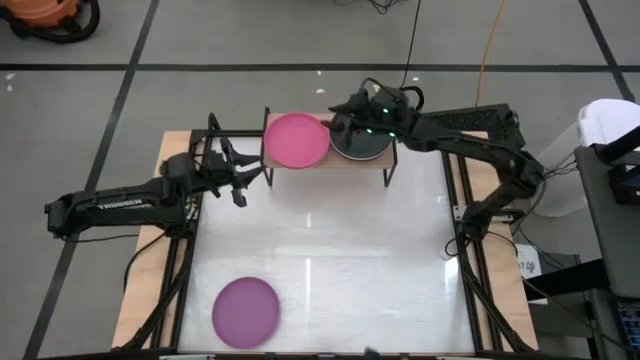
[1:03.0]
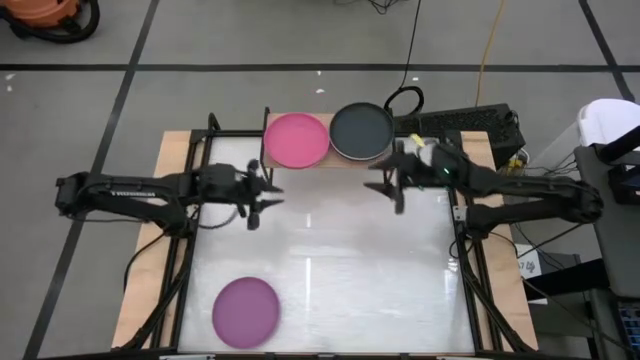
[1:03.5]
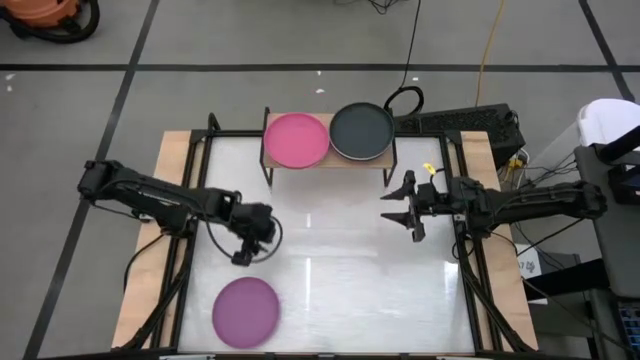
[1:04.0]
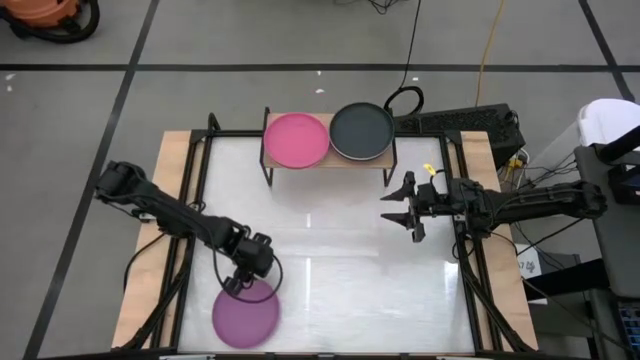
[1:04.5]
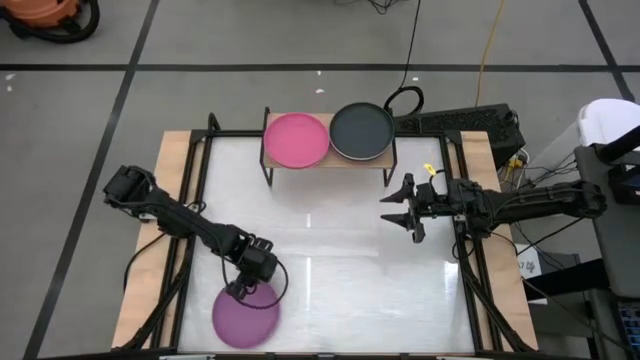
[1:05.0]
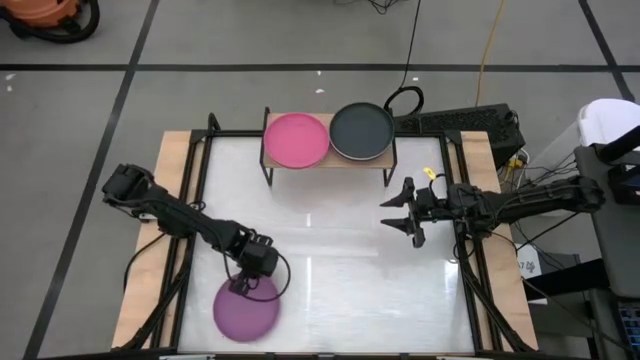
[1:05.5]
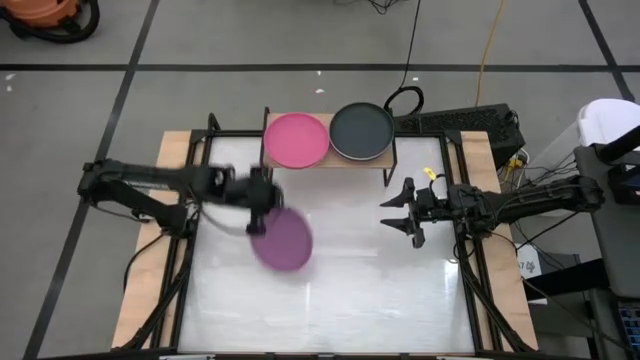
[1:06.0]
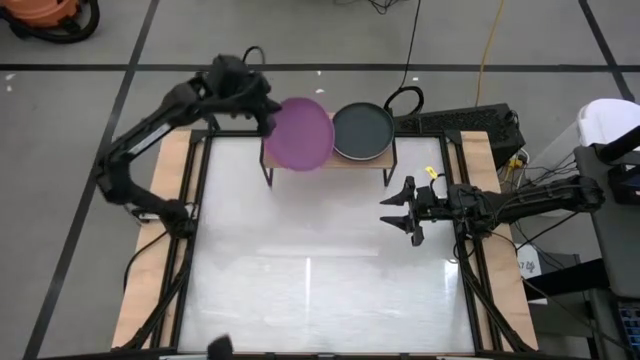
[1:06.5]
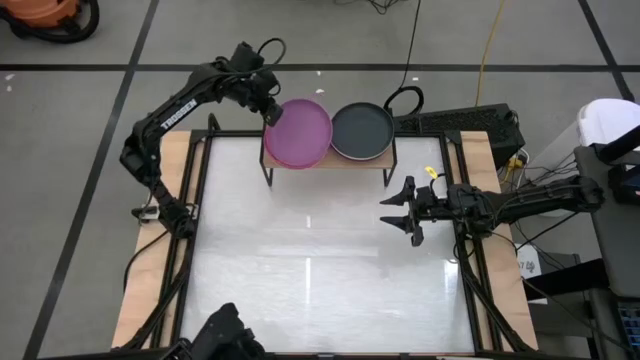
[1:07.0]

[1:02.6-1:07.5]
Task: Place and stack plates onto a shelf
Stack the violet plate on top of the pink plate on the shelf

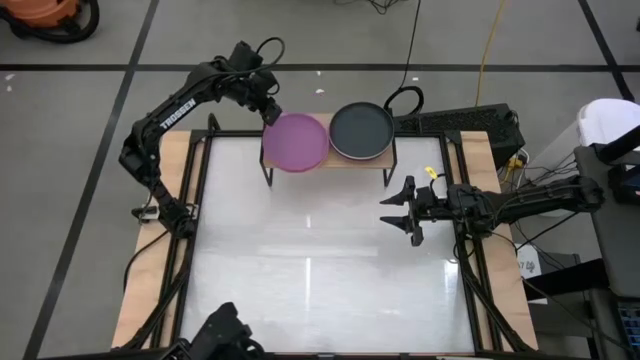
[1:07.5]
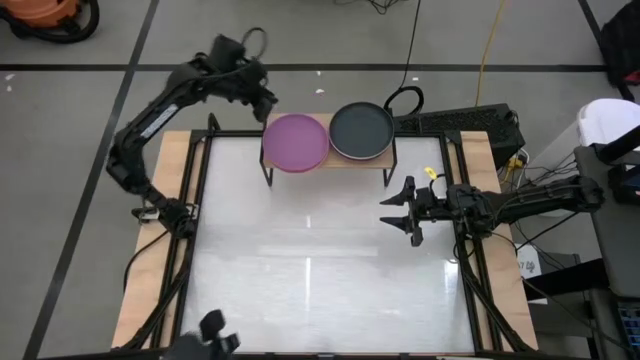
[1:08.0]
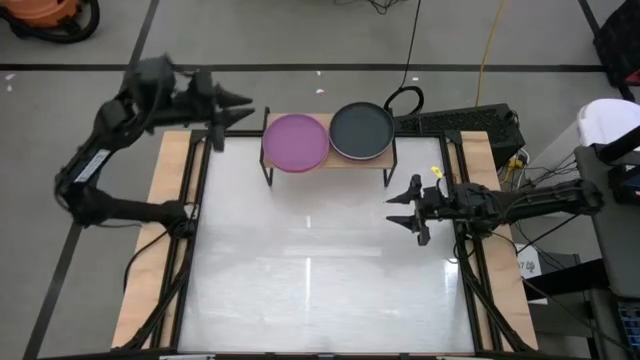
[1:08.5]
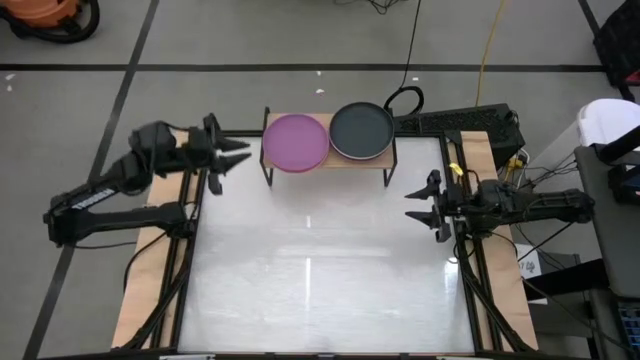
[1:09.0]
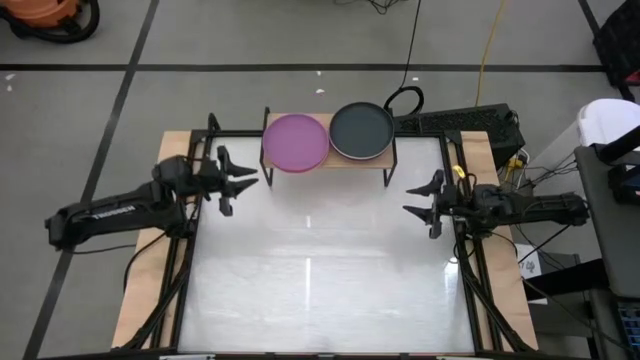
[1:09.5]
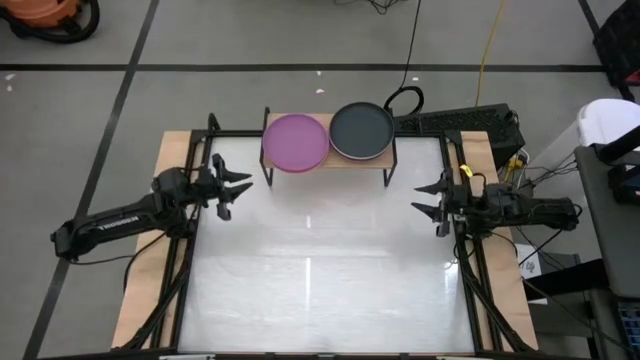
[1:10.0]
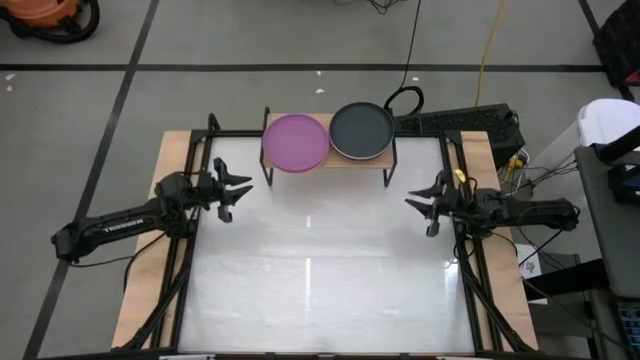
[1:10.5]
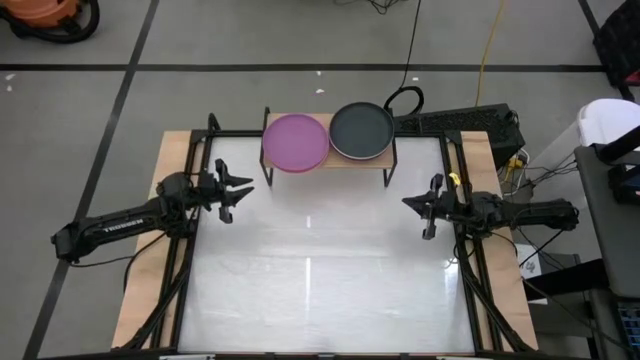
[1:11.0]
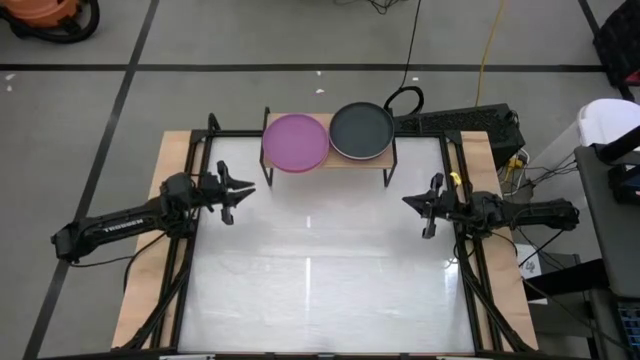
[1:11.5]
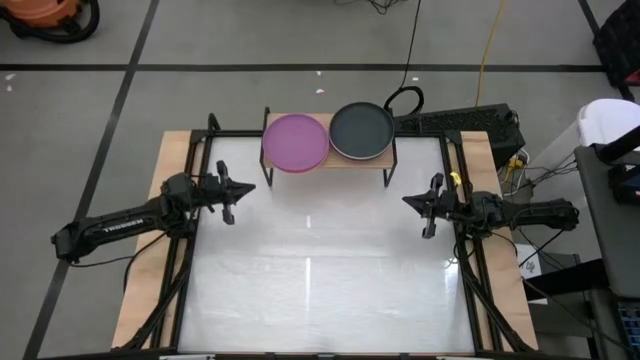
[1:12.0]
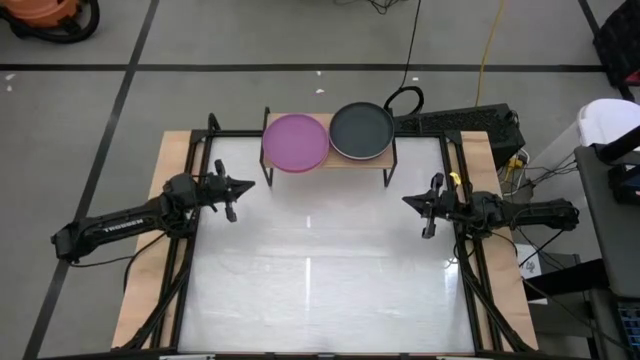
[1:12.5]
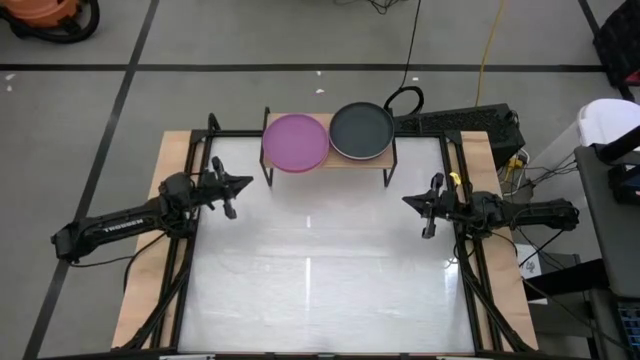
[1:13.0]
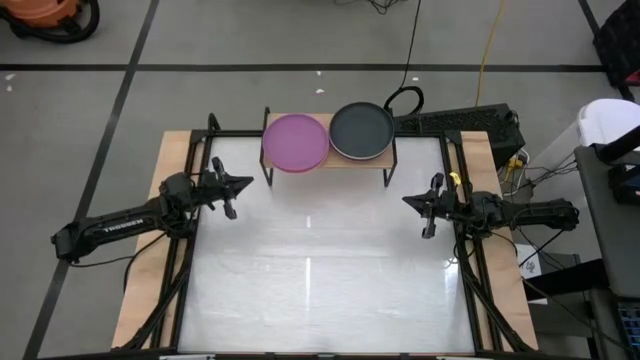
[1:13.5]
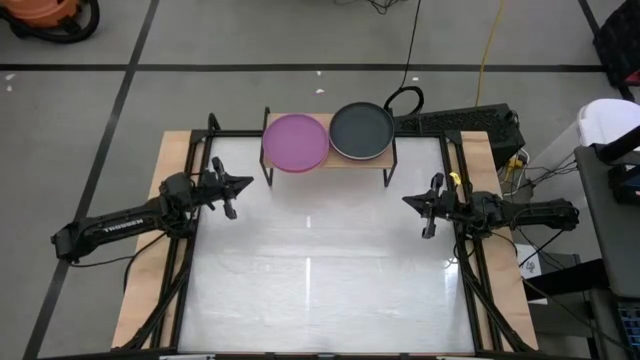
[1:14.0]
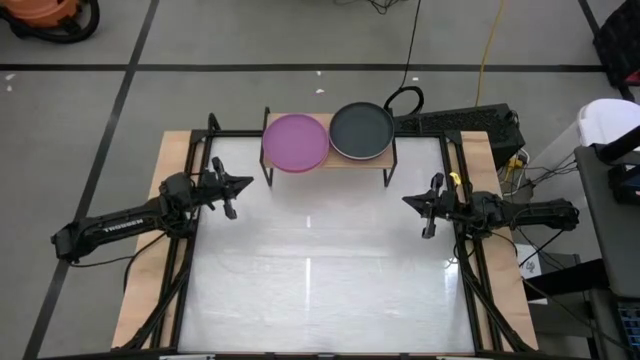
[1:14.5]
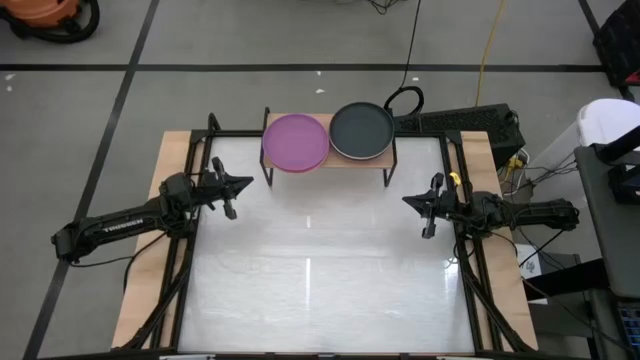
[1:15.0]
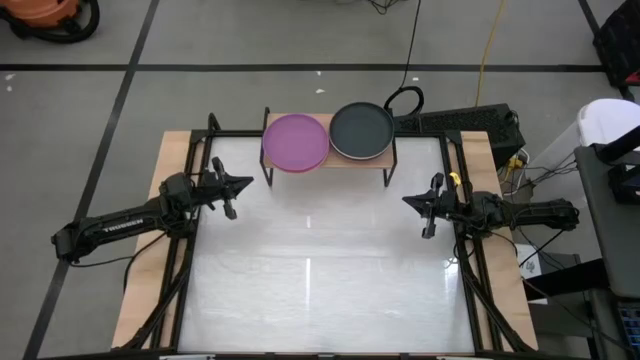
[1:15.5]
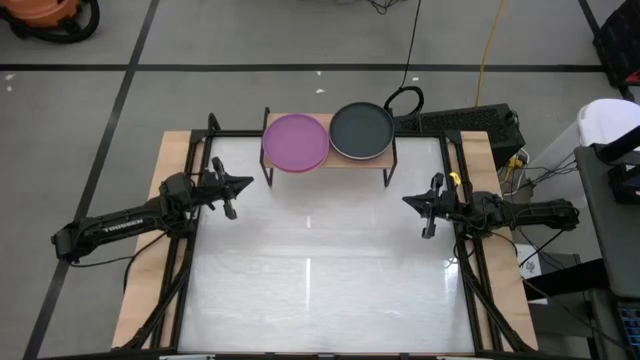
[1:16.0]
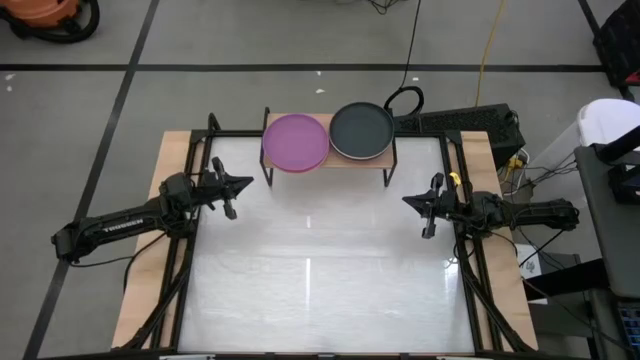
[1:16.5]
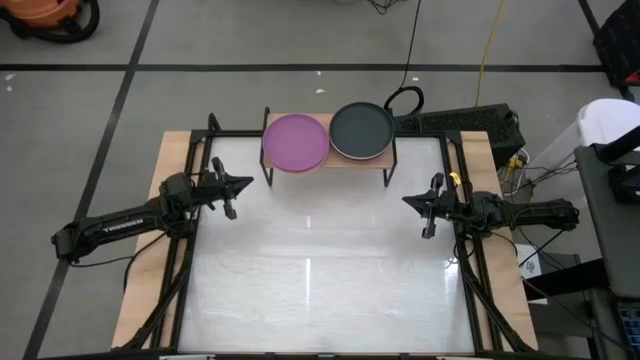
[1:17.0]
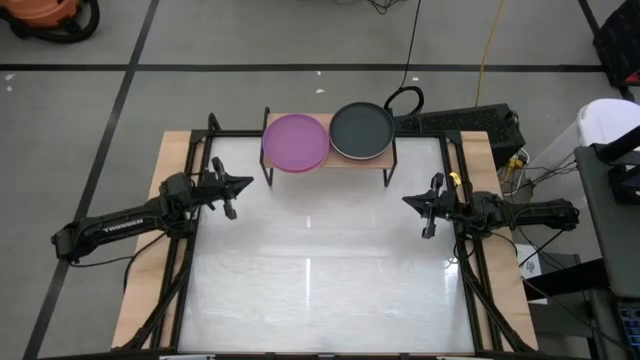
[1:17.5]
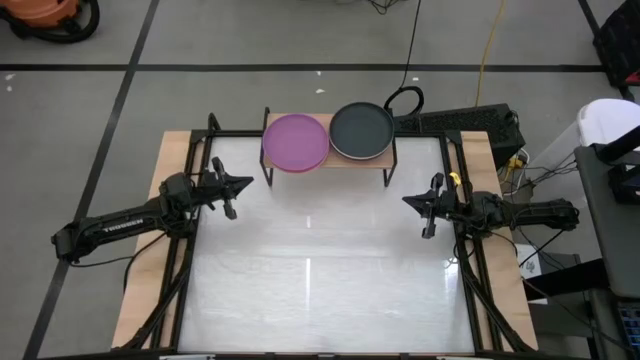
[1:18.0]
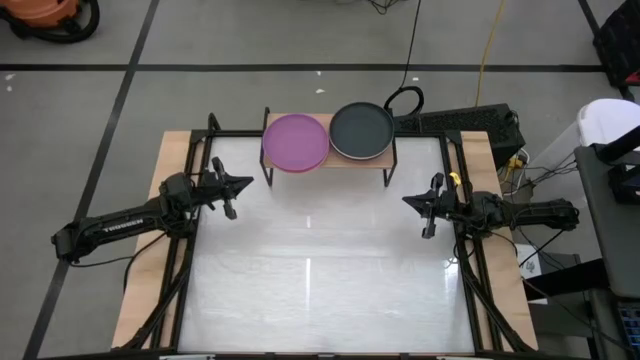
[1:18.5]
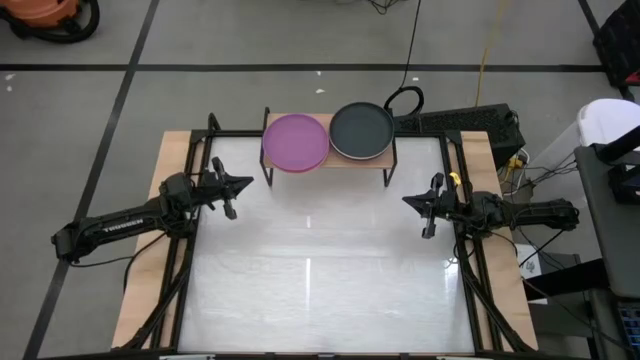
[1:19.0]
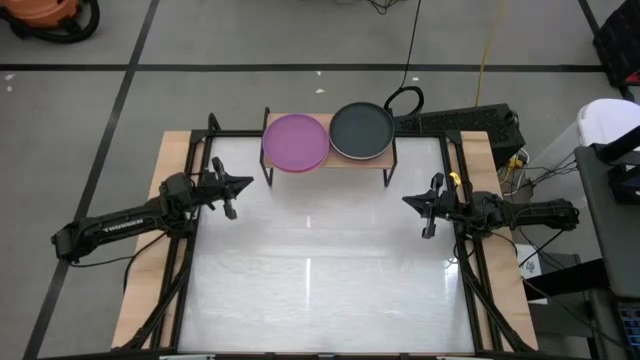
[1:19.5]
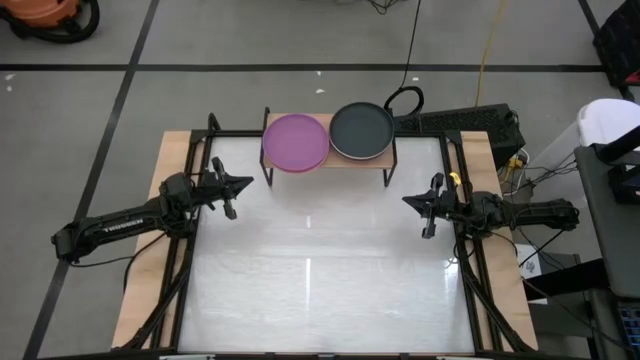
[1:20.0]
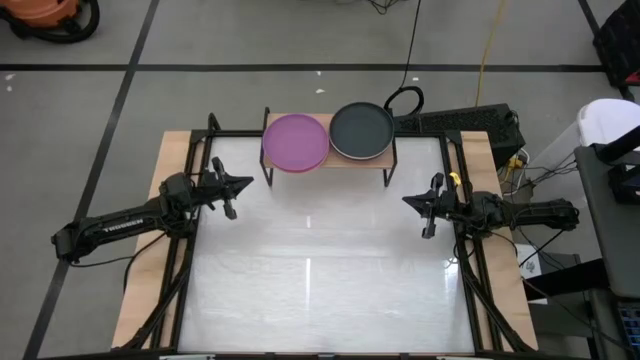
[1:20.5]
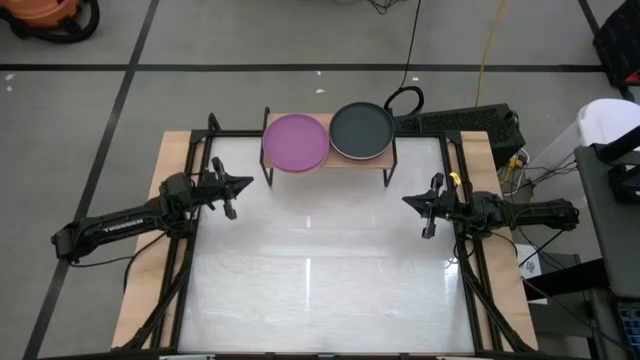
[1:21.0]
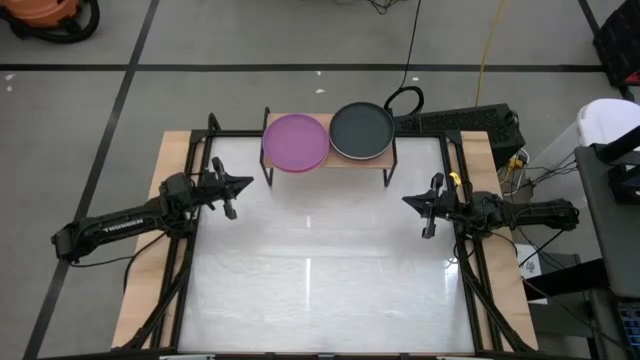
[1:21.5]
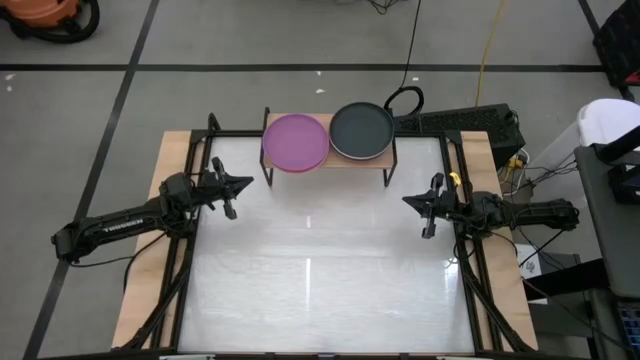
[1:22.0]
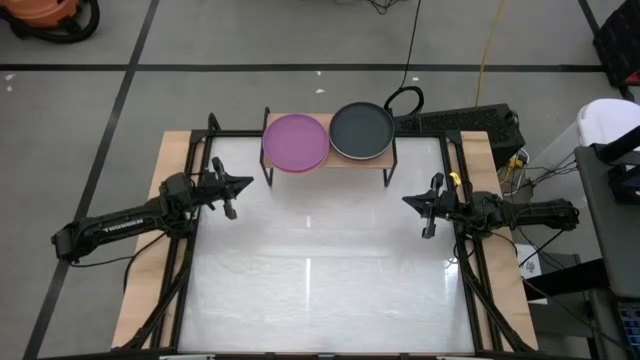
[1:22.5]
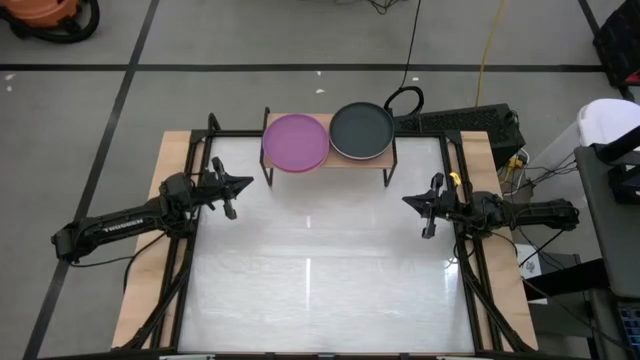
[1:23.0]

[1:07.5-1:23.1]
Return to Home Position

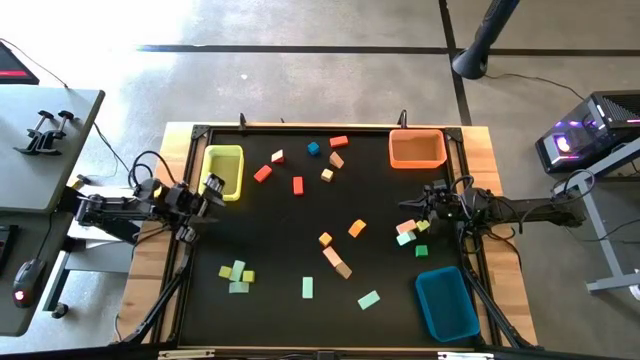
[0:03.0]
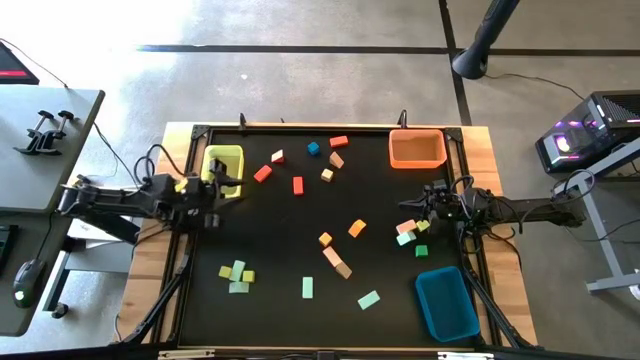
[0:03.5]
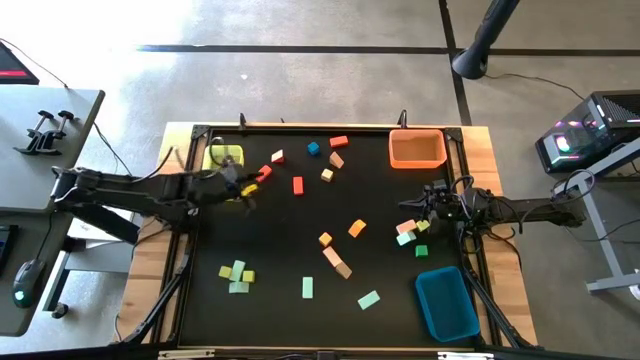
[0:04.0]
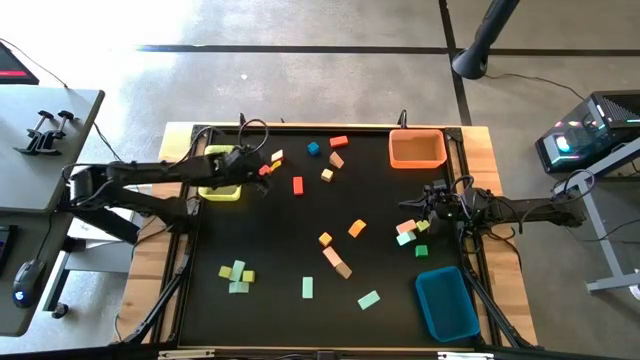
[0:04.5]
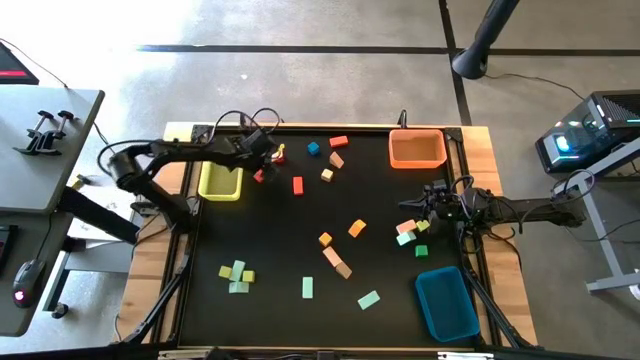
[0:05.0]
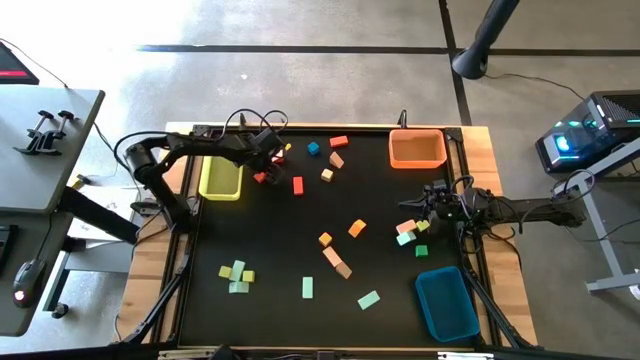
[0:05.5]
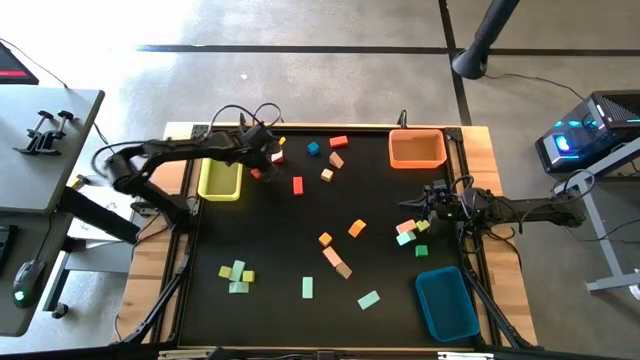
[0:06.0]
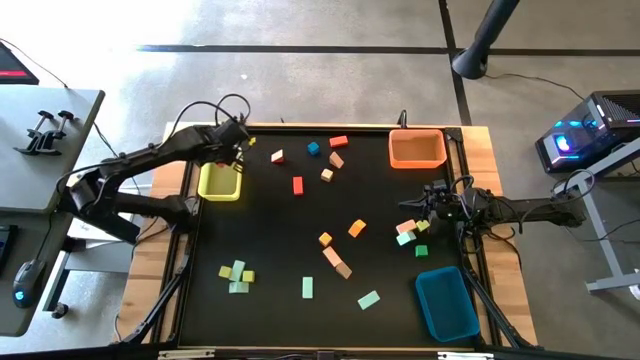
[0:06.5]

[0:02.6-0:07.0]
Task: Sort blocks by size
Put the orange rectangular block into the yellow bin
